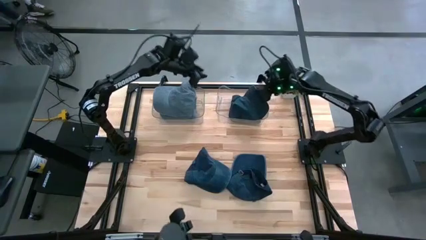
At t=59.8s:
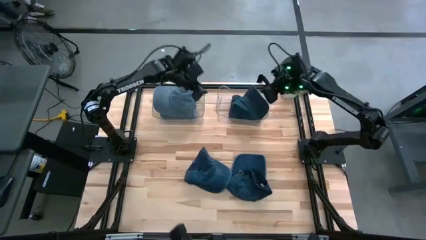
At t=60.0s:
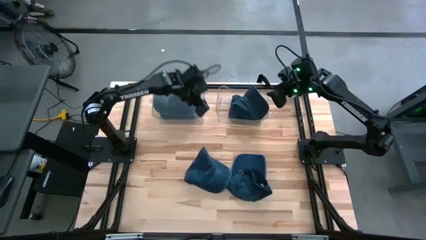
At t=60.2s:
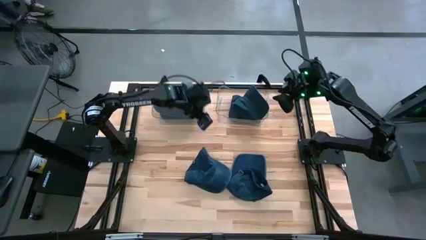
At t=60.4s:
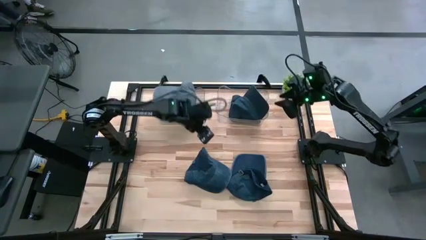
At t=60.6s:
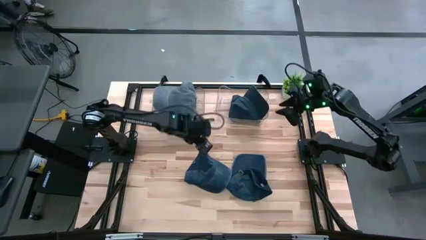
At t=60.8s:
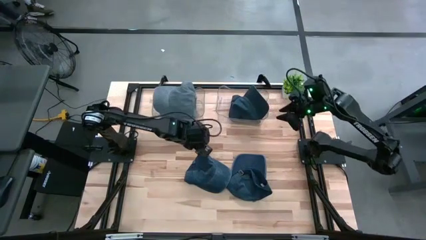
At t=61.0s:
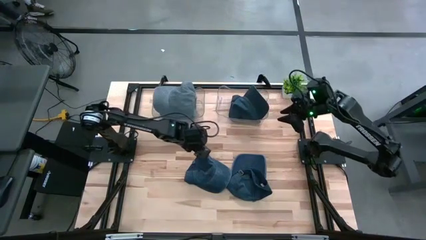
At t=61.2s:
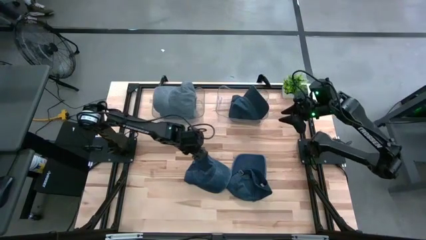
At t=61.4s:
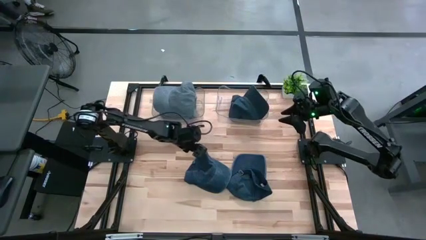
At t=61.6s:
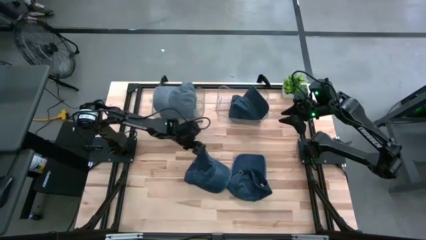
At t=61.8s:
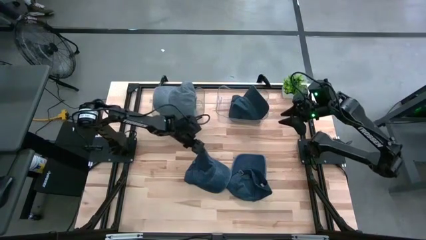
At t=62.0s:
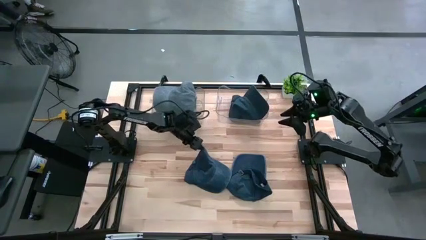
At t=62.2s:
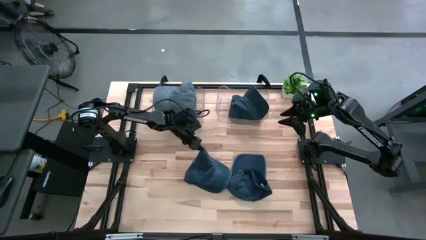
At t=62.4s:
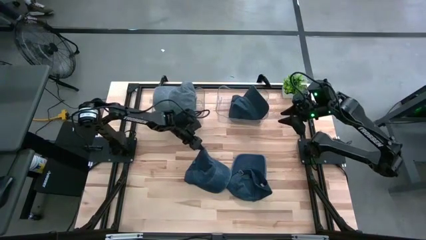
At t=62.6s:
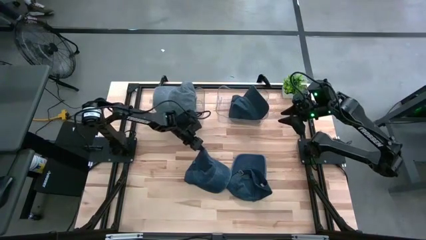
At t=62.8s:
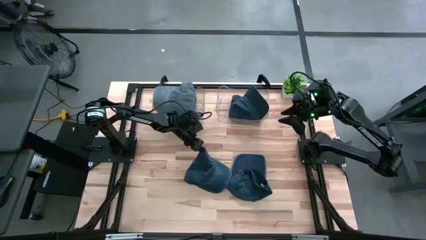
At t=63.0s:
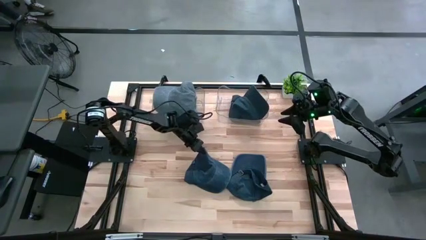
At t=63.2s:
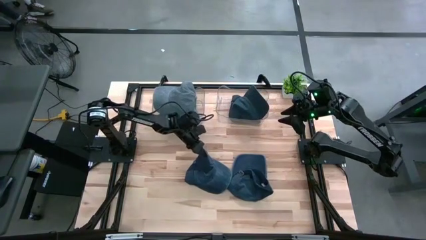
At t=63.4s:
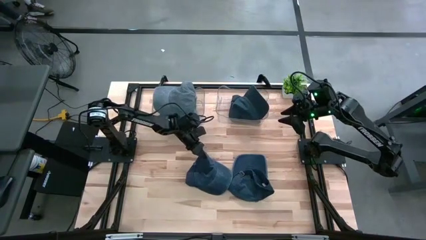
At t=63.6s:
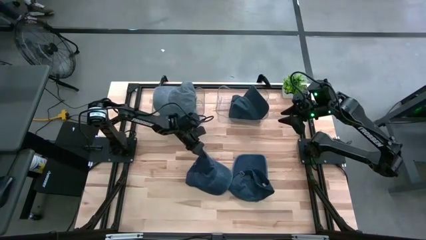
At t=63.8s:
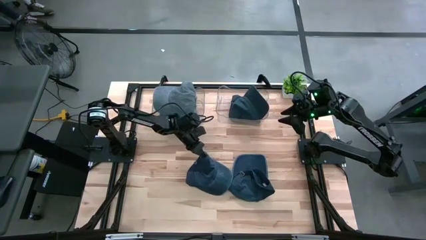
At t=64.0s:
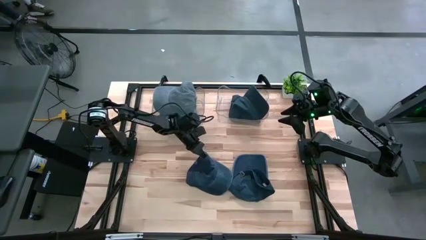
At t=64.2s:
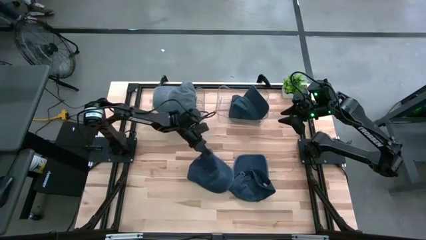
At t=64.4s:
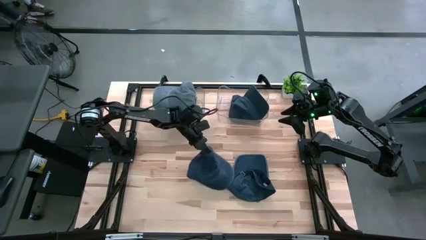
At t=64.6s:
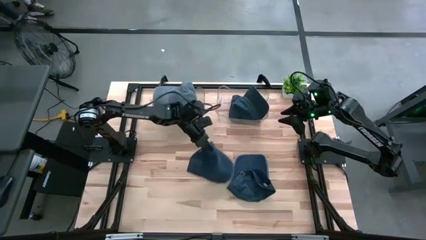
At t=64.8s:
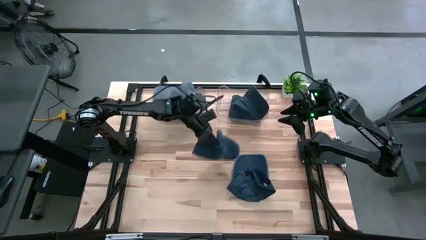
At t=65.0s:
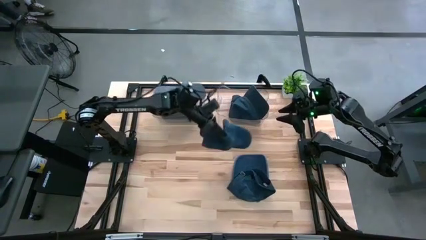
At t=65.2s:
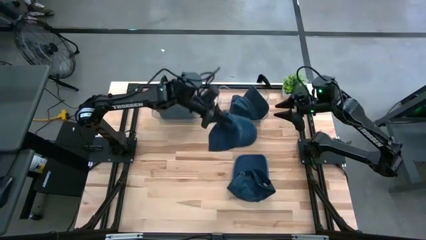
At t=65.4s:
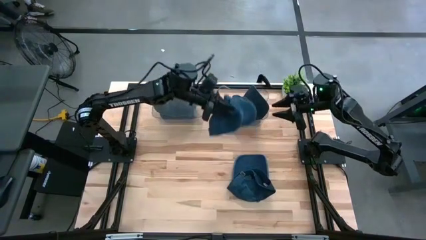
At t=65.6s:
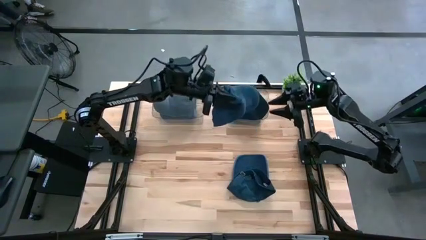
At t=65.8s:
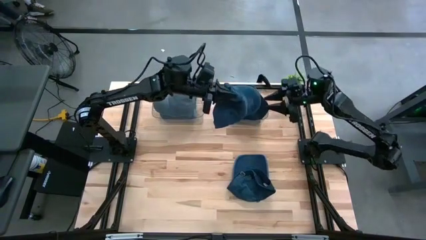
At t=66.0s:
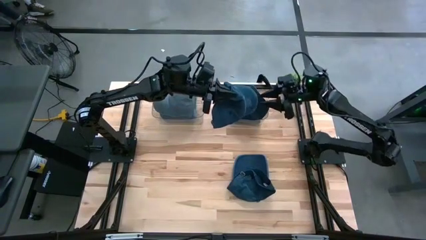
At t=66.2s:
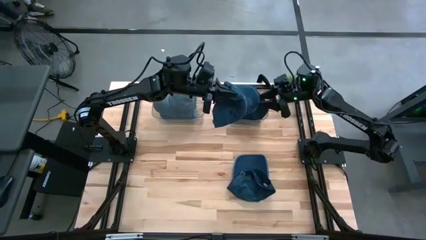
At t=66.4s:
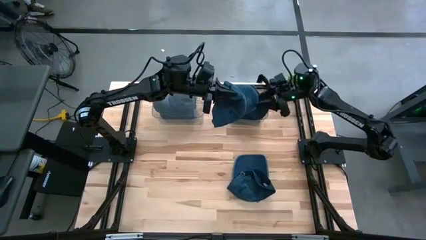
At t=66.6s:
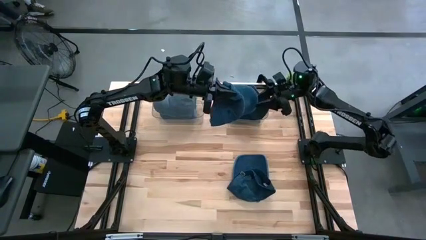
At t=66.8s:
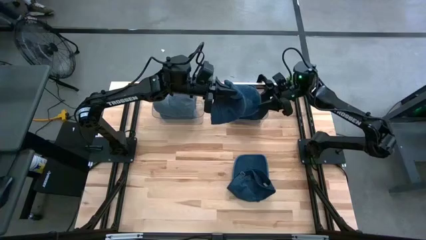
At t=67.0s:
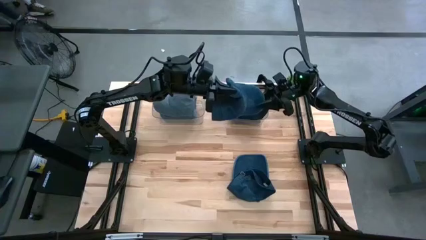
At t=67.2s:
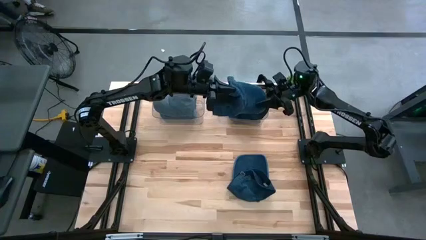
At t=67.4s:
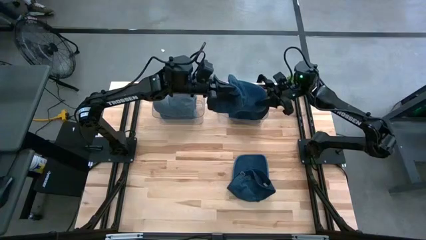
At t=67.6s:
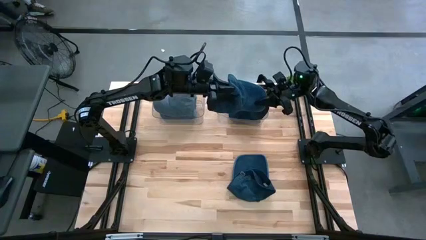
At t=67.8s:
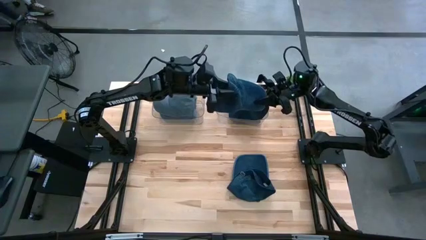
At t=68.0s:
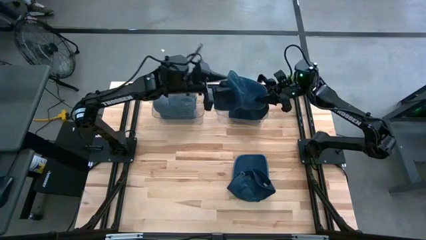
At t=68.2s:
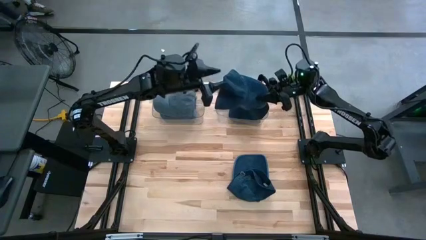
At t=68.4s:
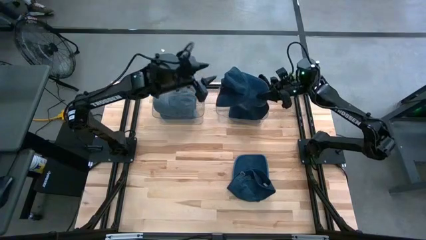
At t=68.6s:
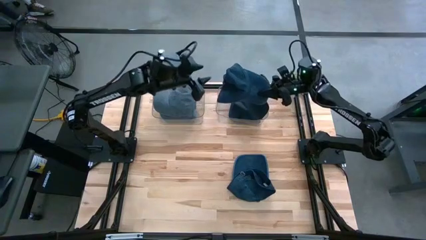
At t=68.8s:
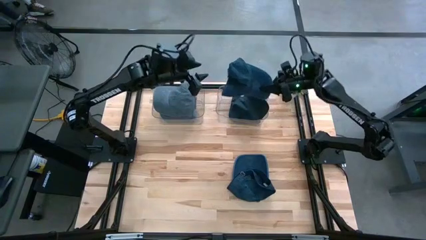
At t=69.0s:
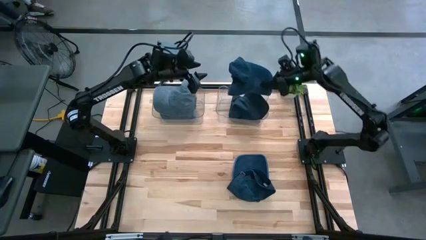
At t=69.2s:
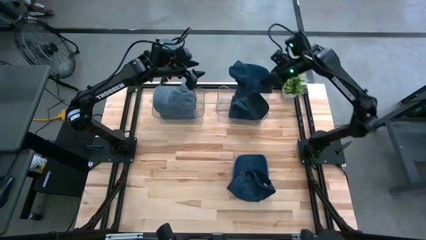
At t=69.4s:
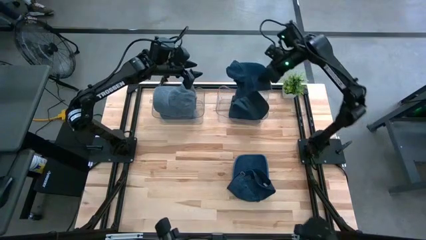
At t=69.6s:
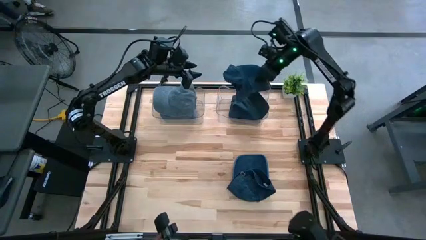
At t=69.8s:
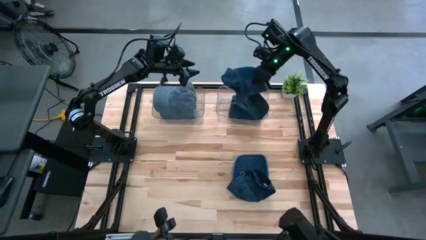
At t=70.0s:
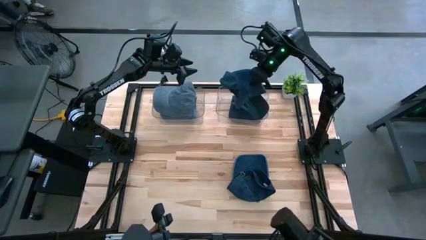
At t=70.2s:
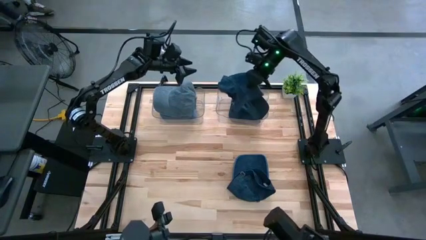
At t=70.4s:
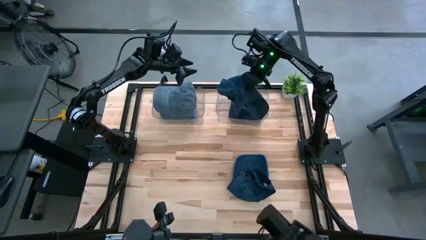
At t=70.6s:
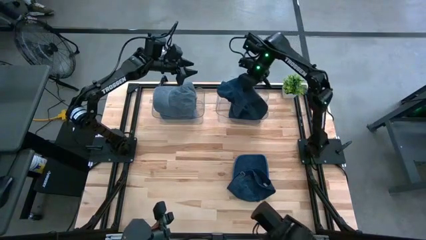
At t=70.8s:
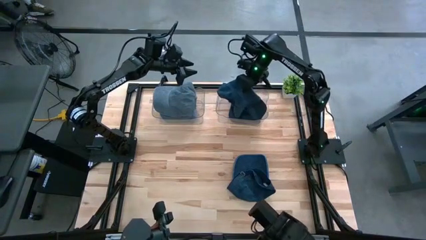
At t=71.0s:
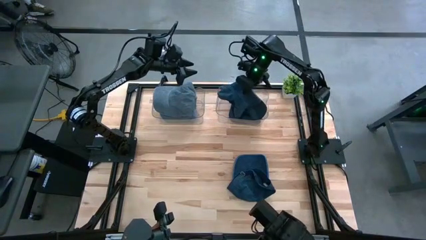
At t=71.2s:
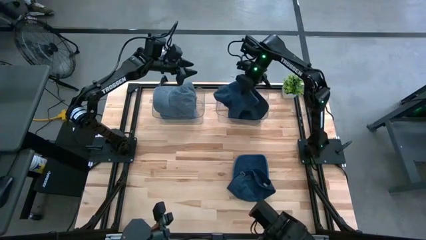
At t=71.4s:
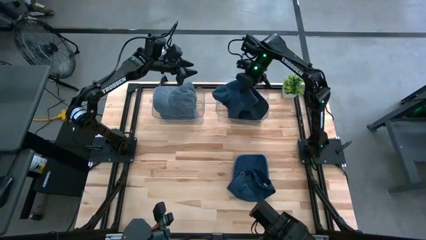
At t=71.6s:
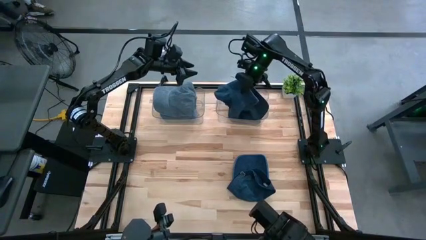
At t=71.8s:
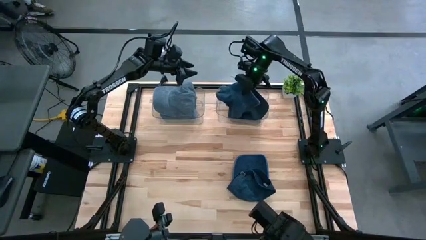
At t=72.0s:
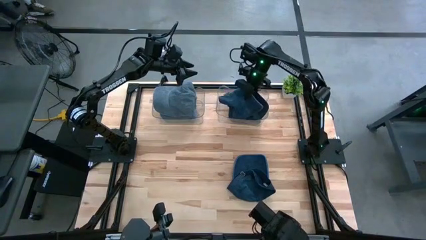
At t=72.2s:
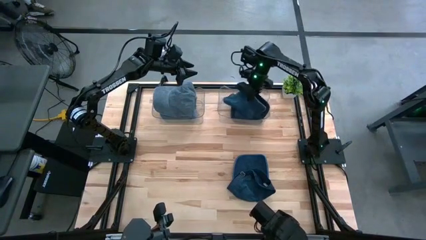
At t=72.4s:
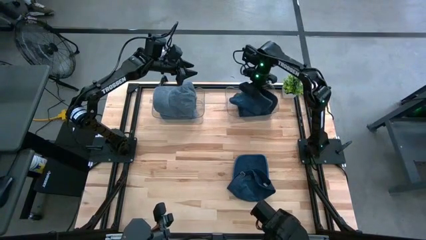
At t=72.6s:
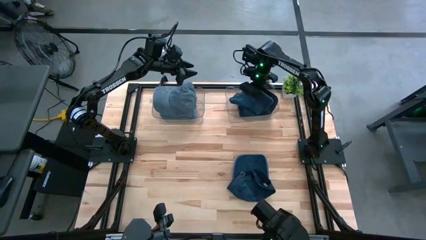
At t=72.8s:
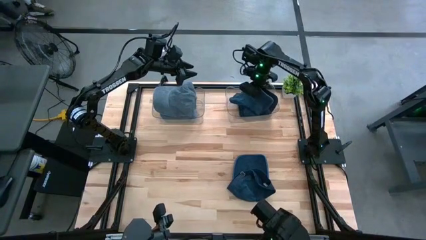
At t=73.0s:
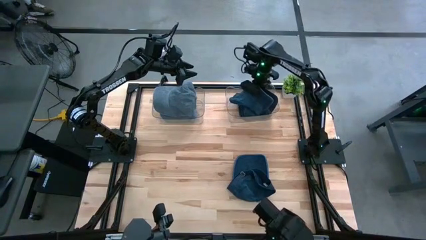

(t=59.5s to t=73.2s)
Task: Pick & Place hat
Put the left blue cap into the right transparent bin

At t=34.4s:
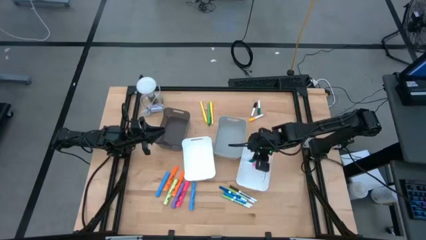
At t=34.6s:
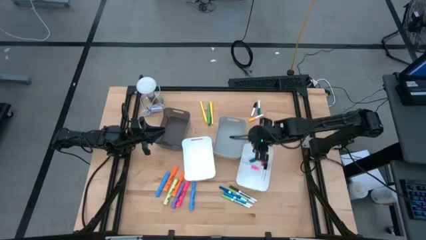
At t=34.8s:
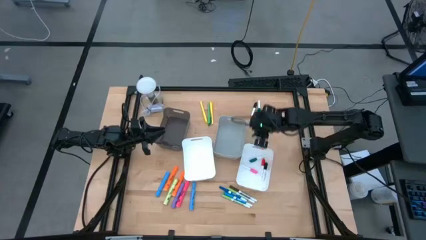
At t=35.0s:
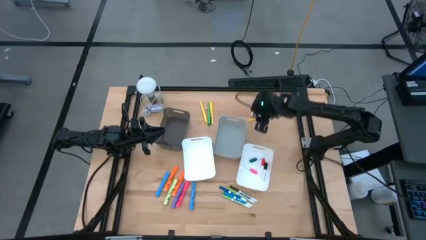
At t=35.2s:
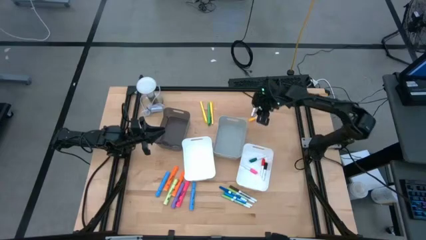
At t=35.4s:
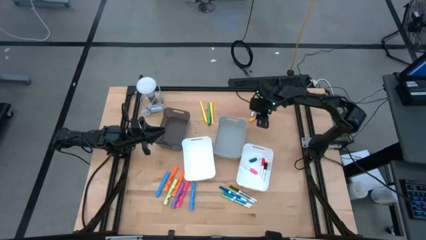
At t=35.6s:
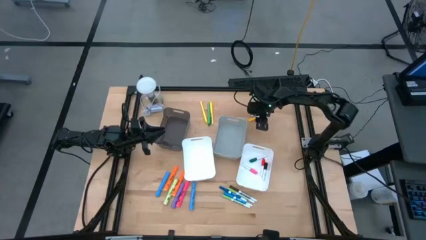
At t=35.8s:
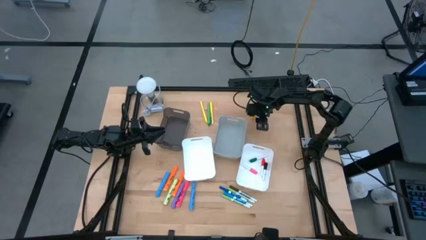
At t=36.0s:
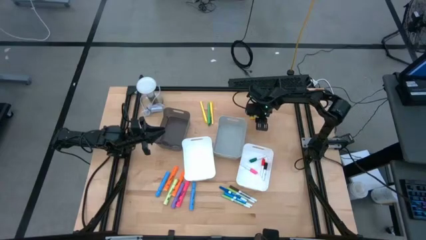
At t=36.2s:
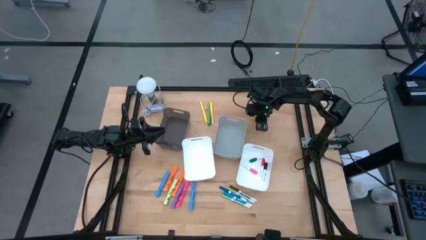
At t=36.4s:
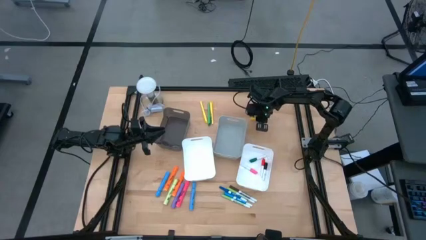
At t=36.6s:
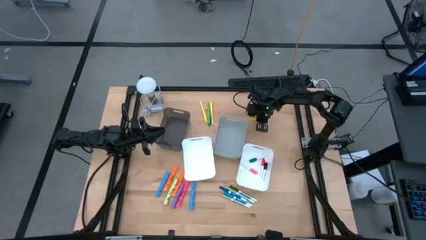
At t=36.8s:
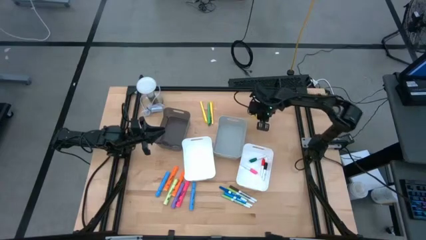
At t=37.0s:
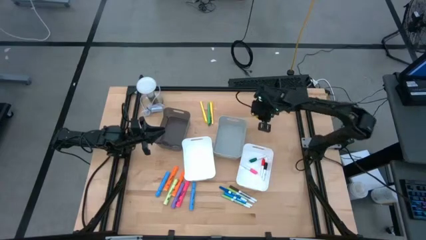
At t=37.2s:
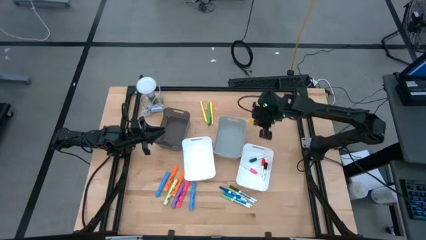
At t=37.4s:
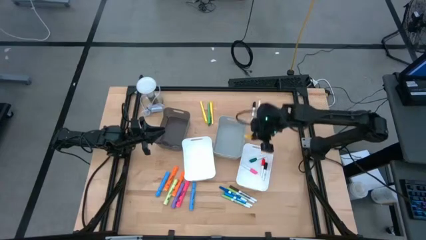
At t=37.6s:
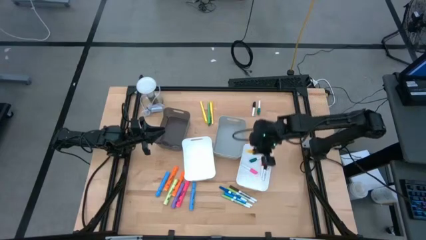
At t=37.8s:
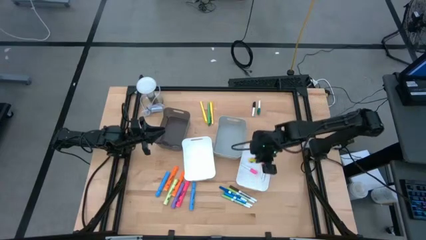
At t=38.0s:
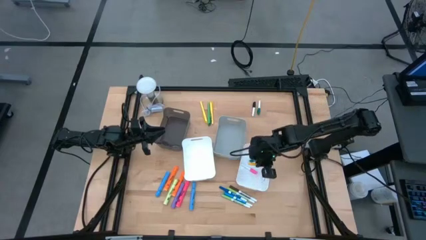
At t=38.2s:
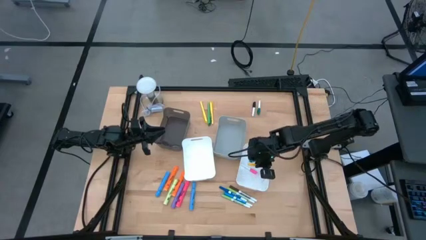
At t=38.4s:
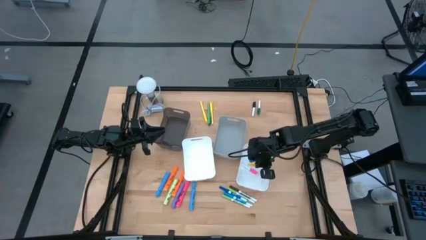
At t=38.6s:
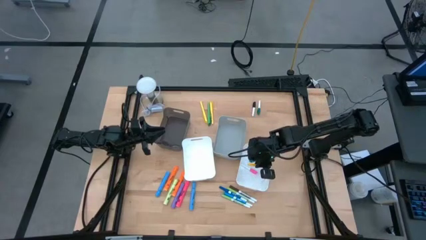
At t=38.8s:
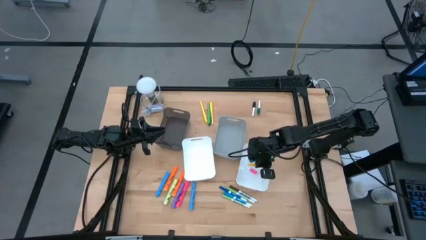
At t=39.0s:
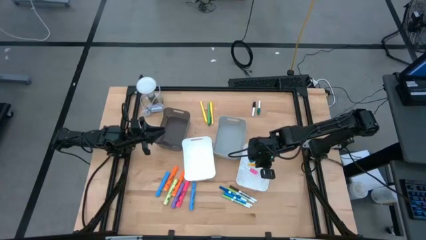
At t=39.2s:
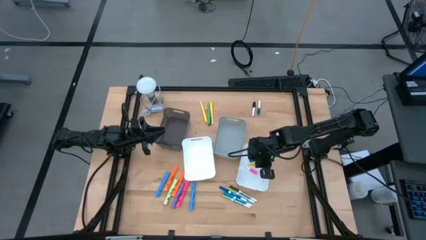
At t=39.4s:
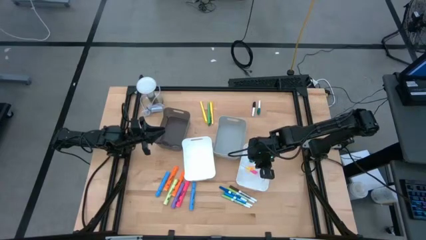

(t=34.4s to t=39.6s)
Task: Pick & Place Markers
Put the yellow mini marker into the right white bin
